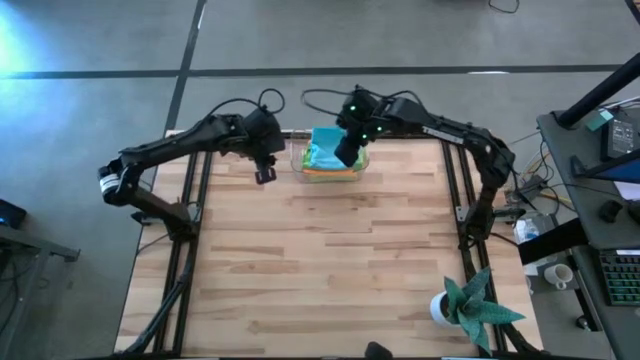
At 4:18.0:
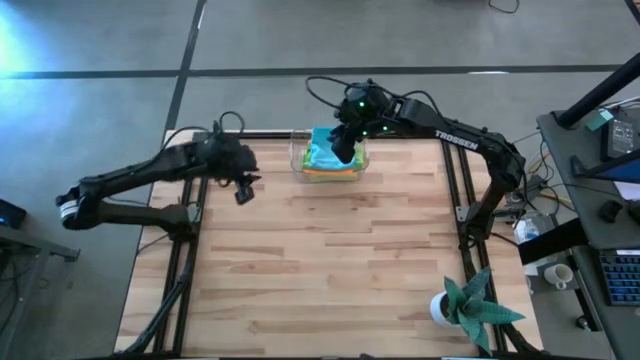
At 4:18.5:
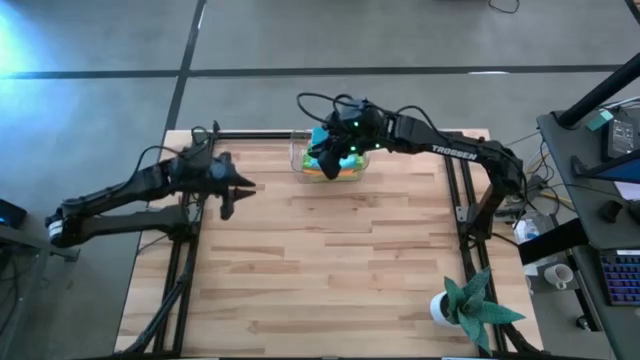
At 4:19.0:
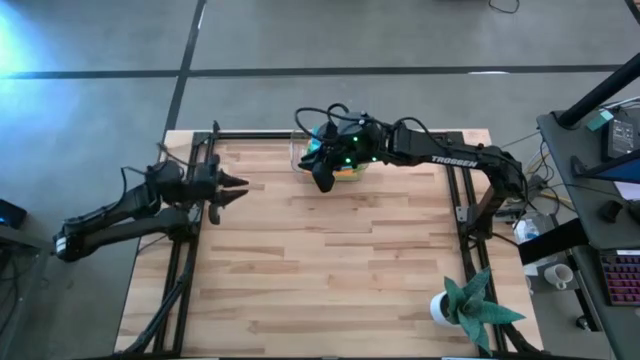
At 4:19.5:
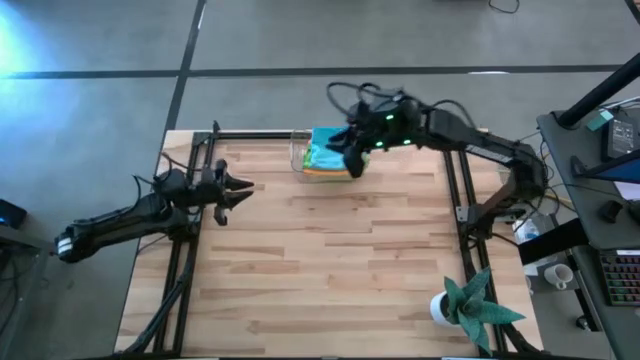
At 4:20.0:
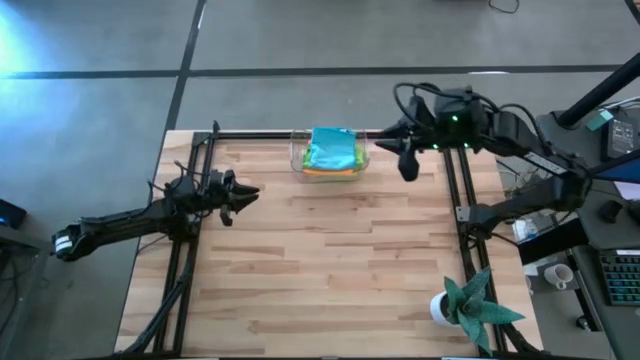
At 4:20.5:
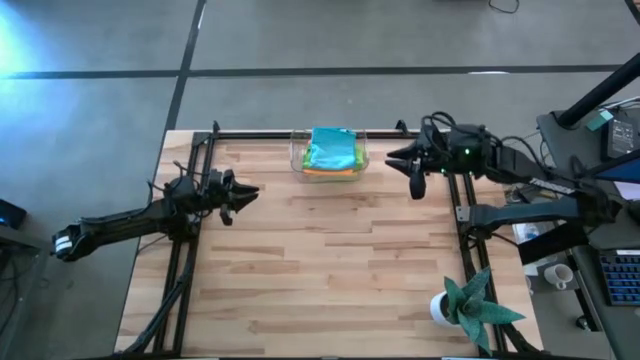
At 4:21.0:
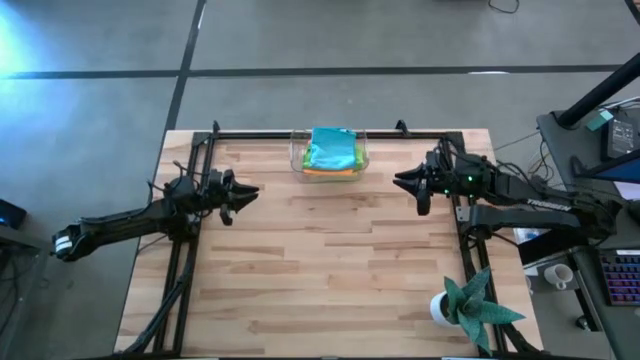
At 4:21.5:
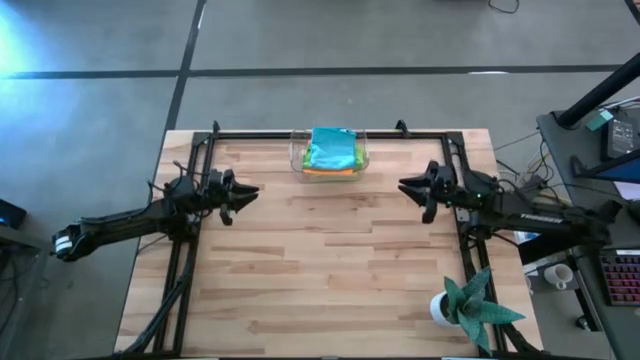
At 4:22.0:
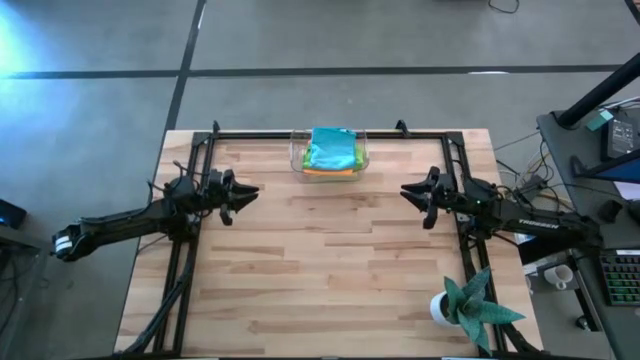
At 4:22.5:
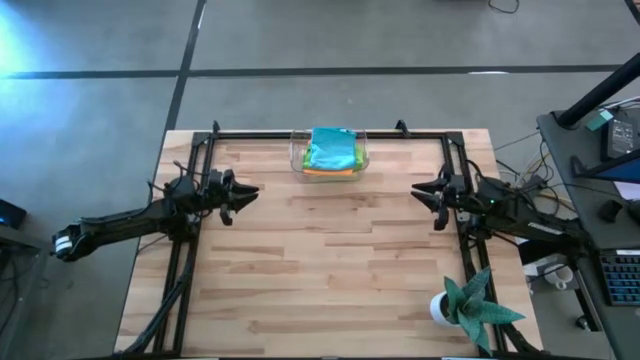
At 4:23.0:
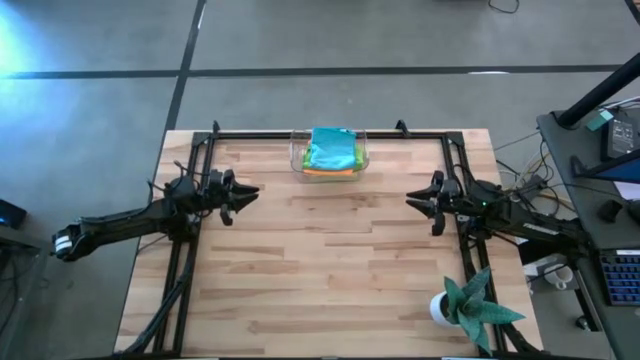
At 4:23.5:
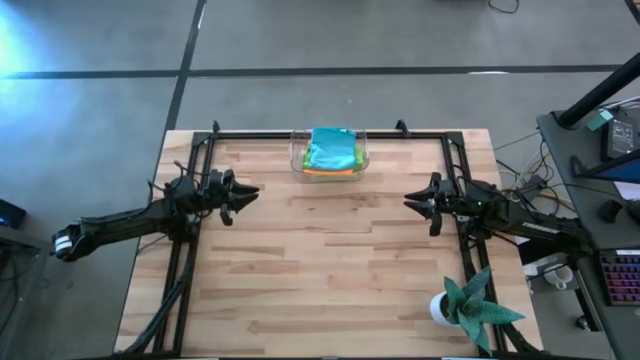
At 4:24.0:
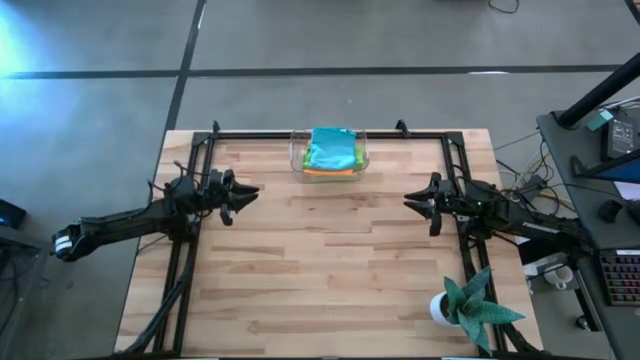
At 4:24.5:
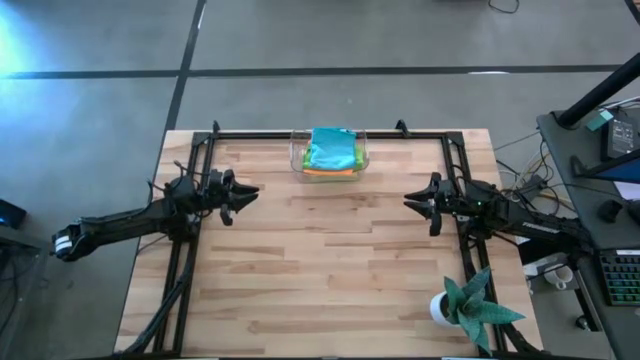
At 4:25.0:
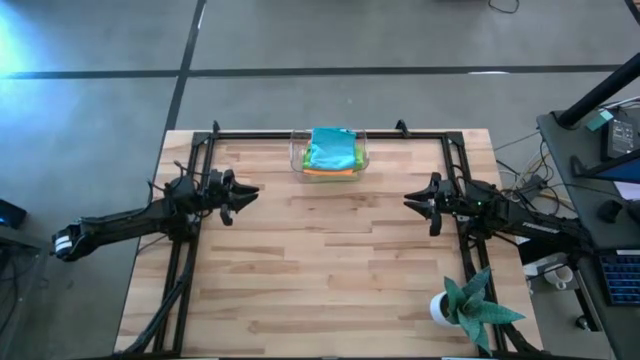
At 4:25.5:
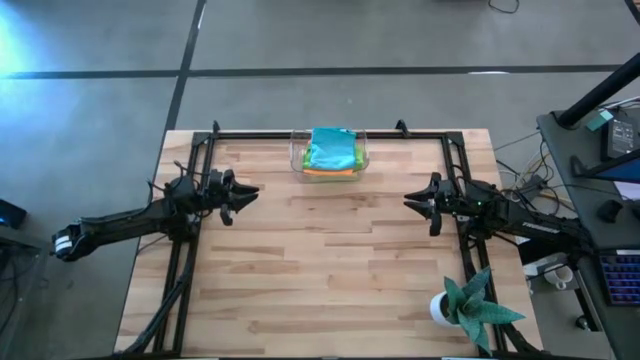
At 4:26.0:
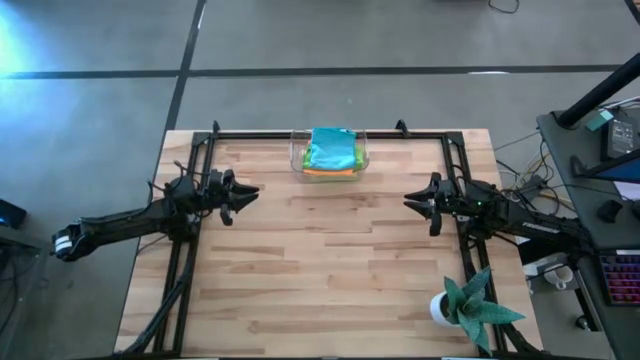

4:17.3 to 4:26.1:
Task: Fold microfiber towels
Return to Home Position

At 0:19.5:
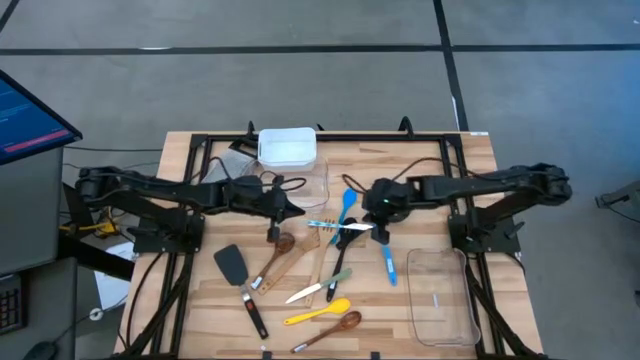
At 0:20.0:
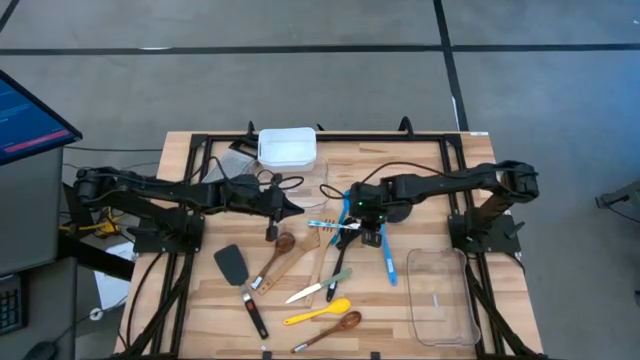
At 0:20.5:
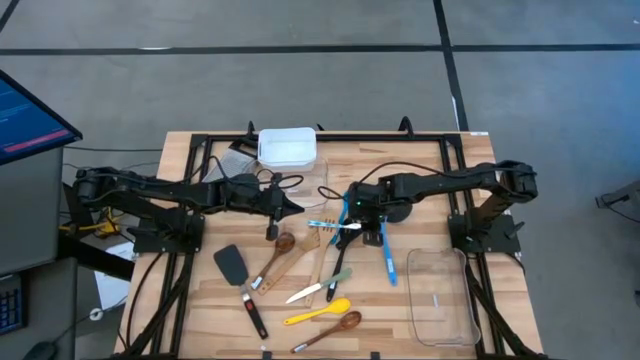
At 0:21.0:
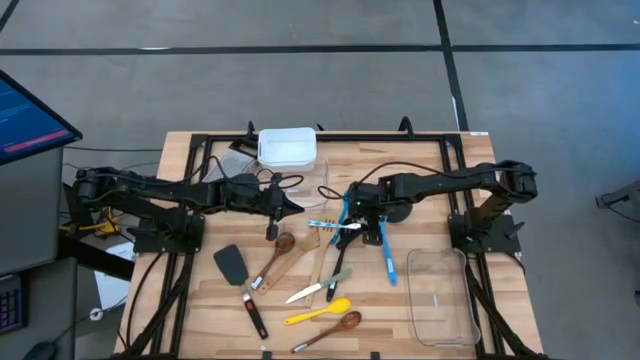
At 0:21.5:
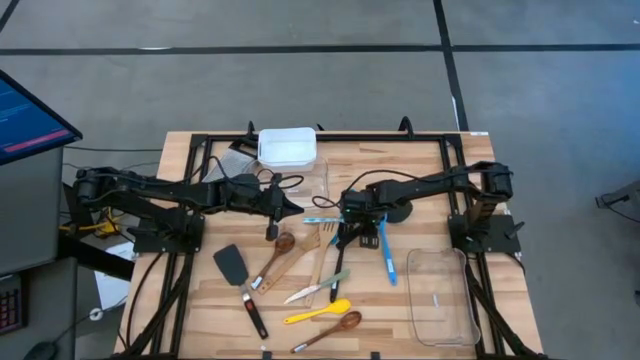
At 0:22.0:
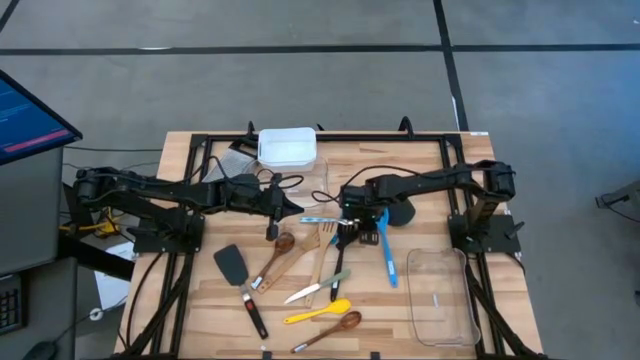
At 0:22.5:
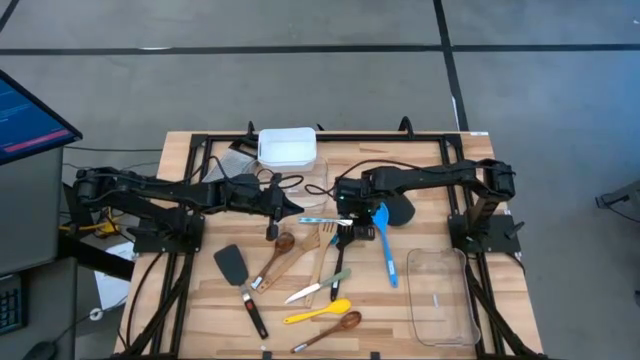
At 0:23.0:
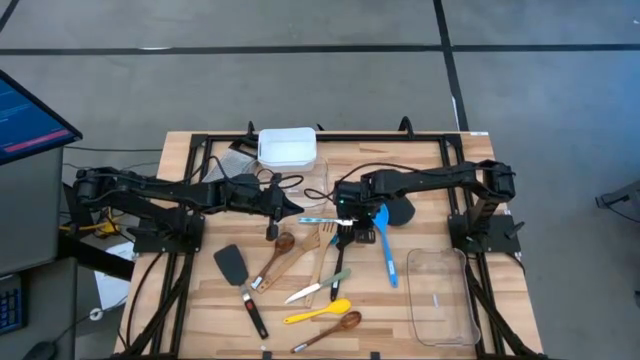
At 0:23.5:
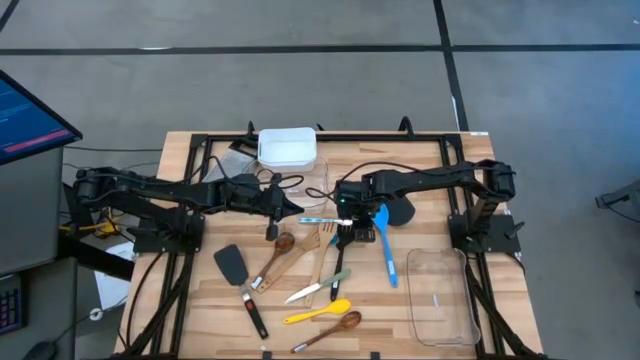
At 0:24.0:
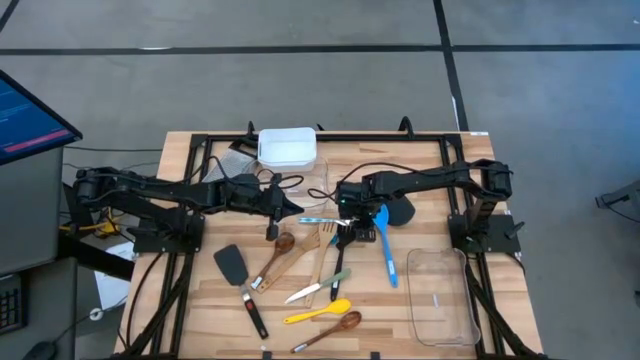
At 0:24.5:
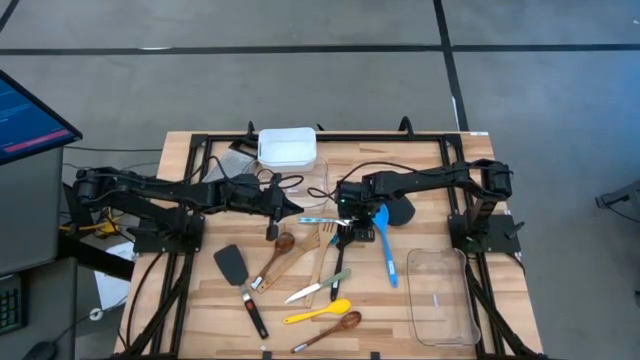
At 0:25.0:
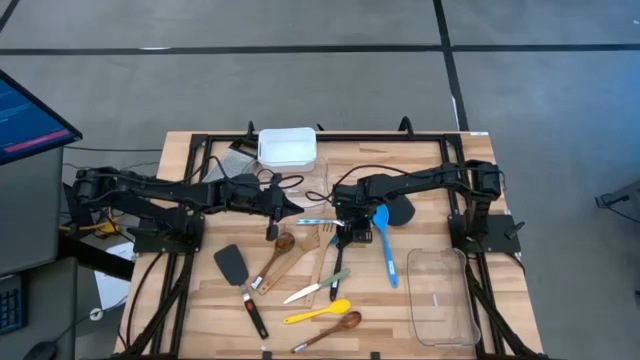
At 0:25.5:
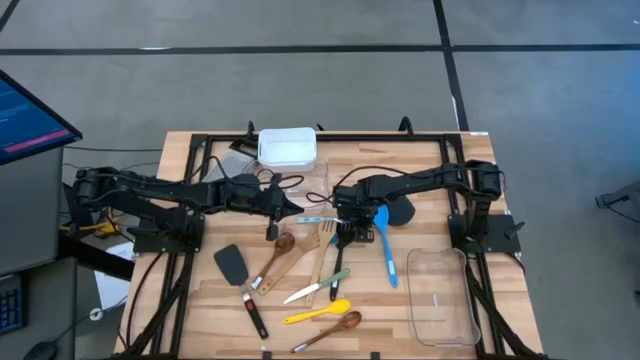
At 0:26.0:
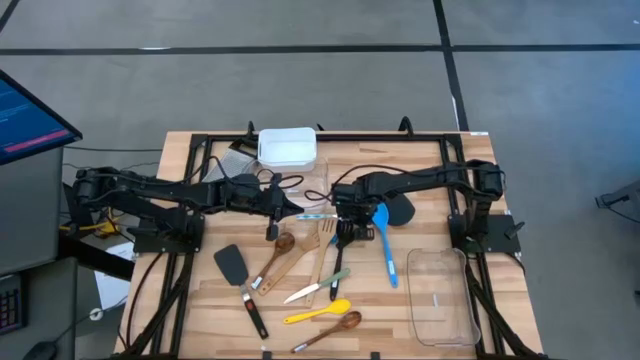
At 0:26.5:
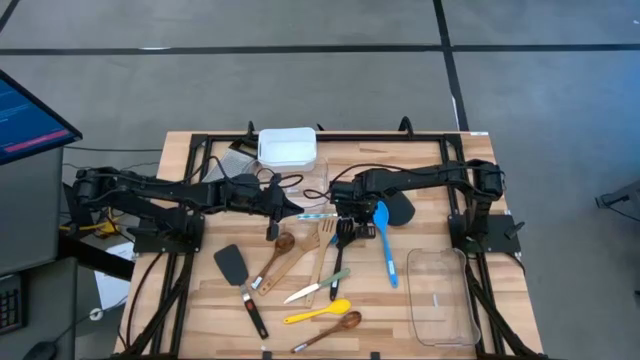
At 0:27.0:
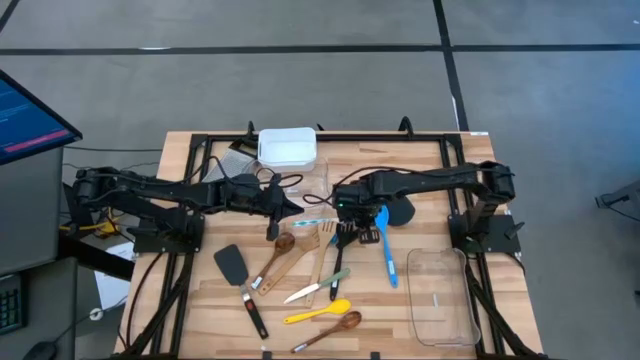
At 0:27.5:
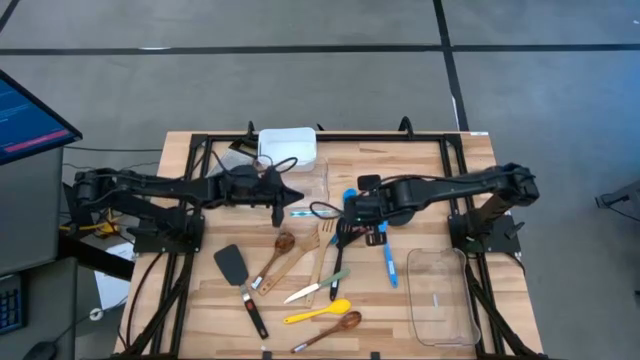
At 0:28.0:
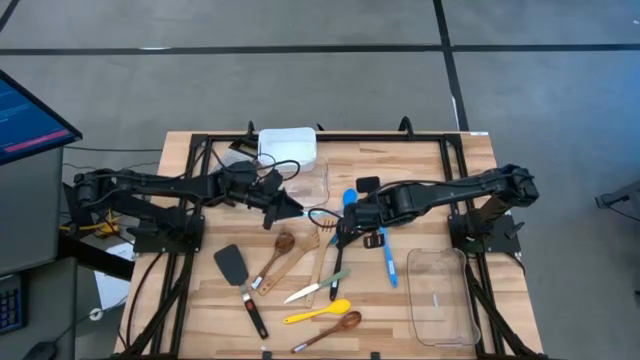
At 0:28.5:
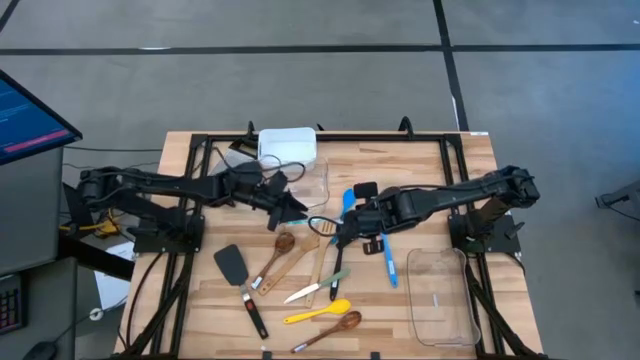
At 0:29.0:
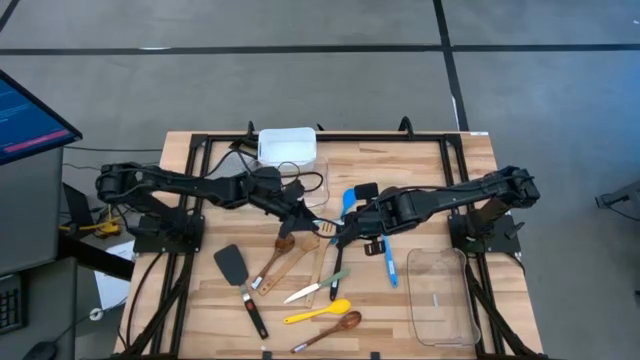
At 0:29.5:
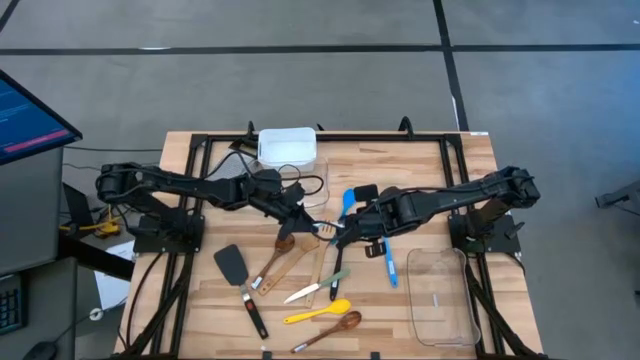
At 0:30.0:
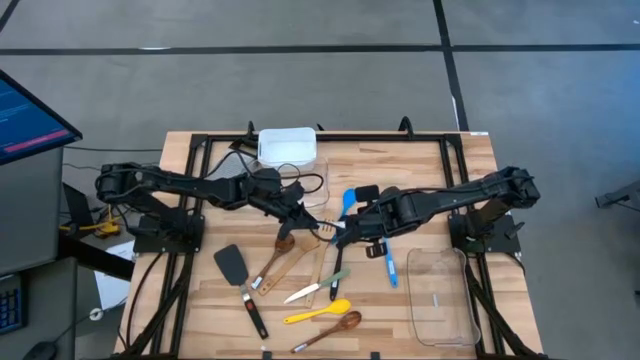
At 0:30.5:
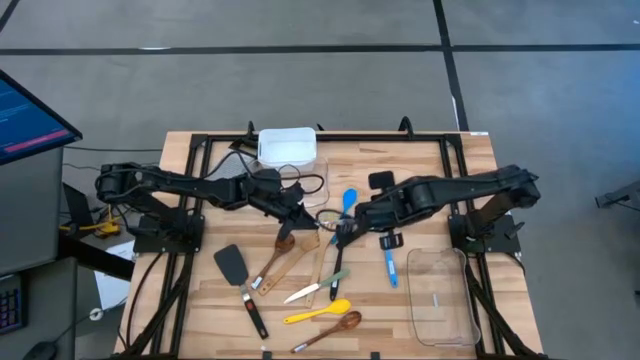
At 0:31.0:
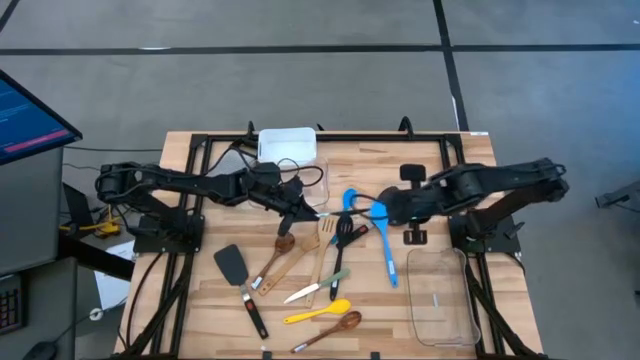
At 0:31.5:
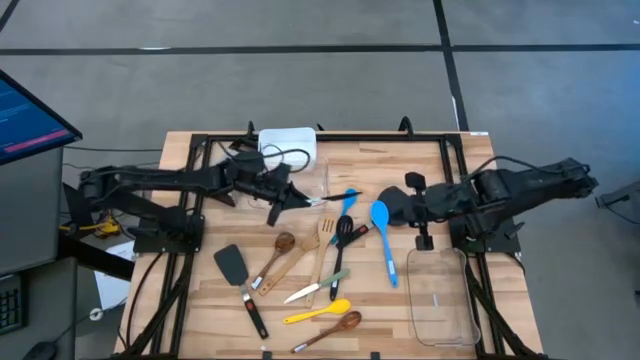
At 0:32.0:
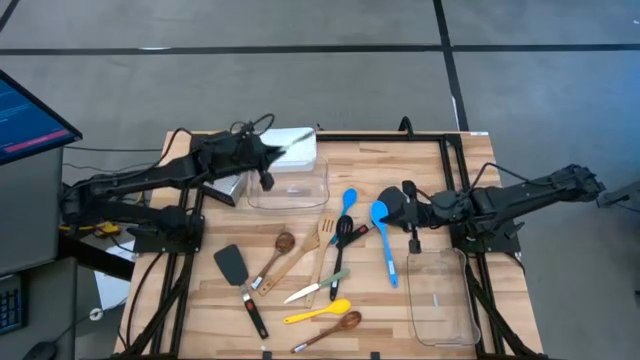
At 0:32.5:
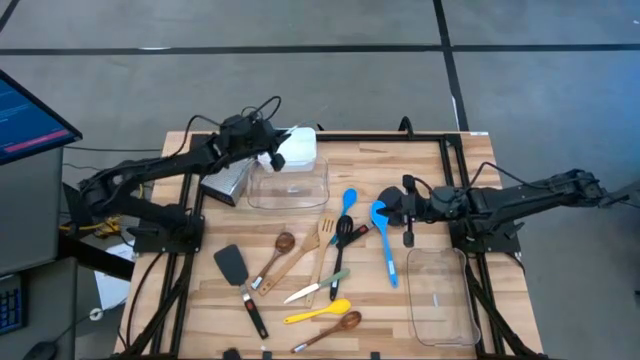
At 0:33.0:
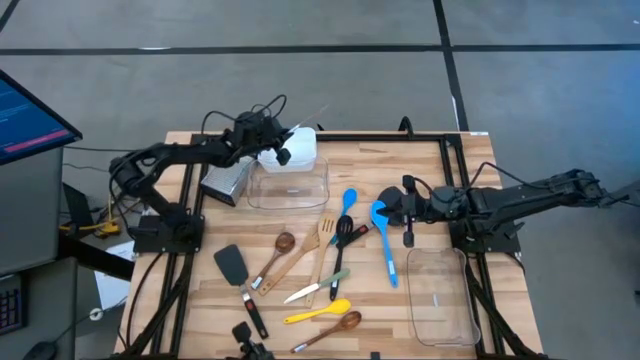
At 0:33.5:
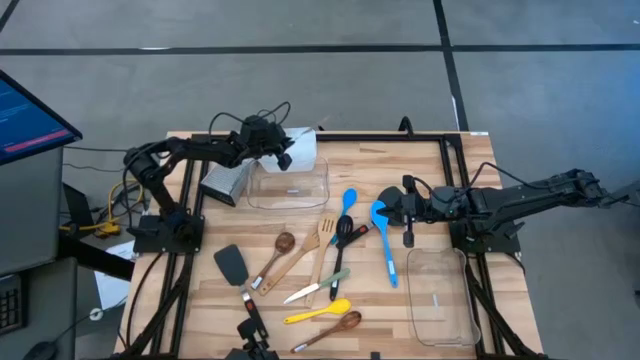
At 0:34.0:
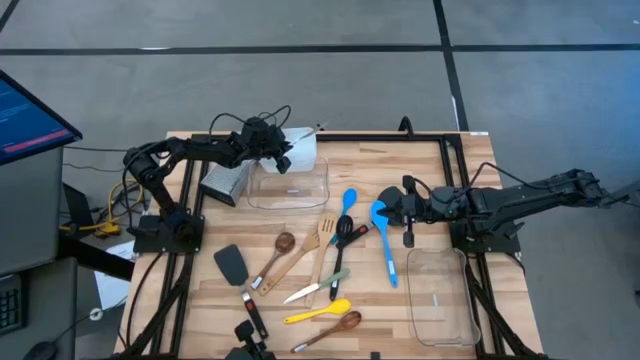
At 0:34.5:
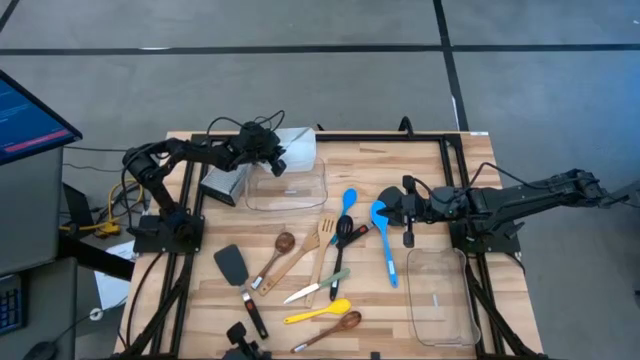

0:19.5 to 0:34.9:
Task: Pick & Place Kitchen Items
Put the blue patterned table knife into the white bin
